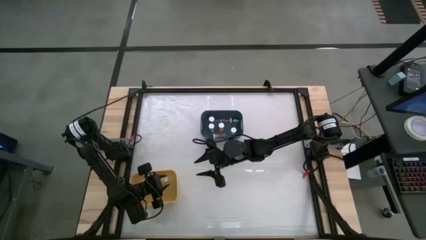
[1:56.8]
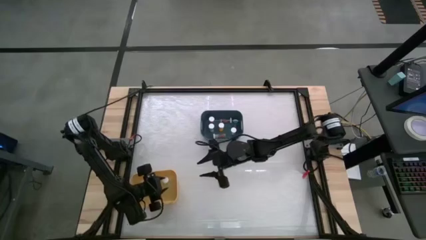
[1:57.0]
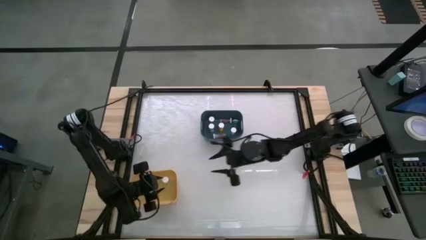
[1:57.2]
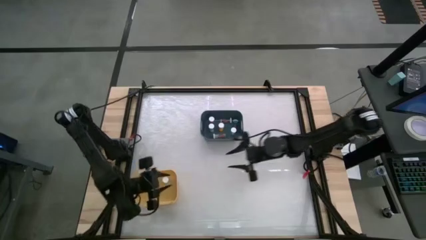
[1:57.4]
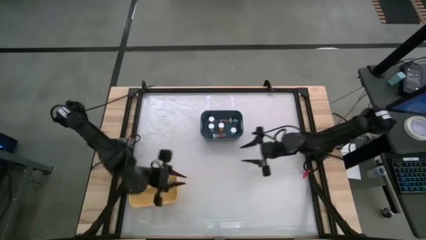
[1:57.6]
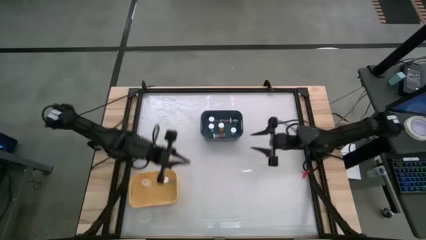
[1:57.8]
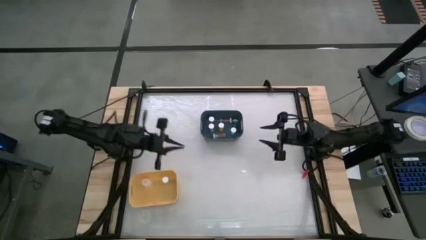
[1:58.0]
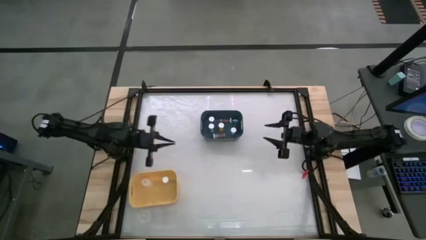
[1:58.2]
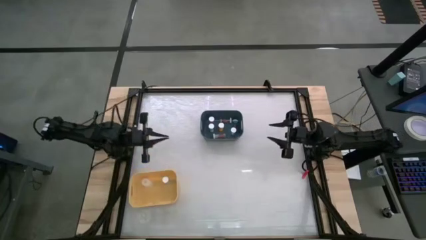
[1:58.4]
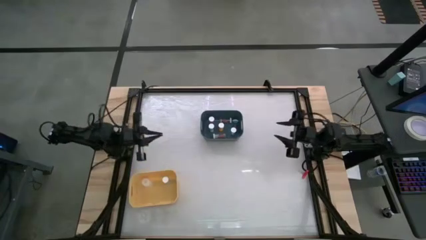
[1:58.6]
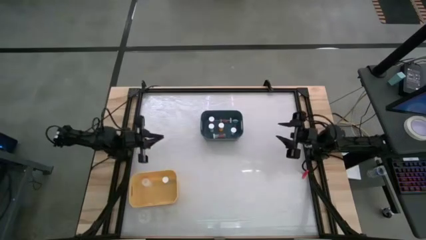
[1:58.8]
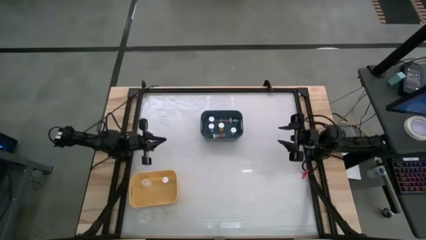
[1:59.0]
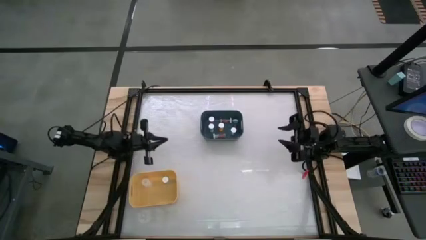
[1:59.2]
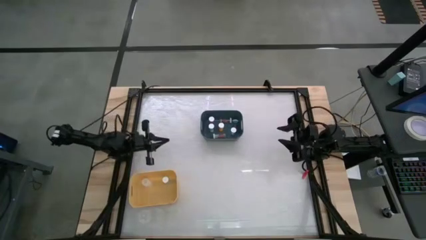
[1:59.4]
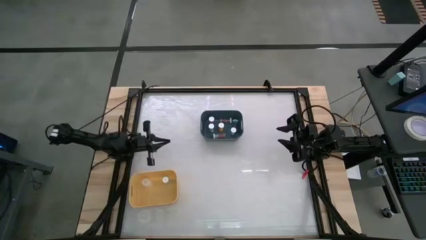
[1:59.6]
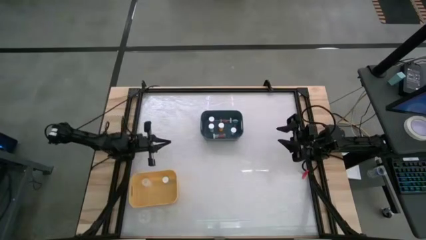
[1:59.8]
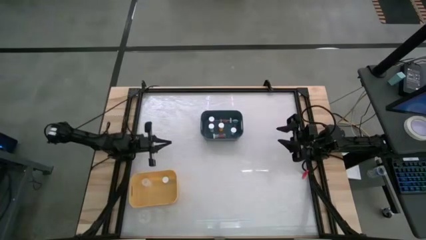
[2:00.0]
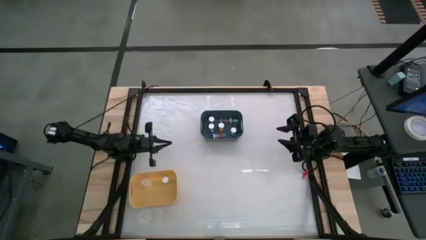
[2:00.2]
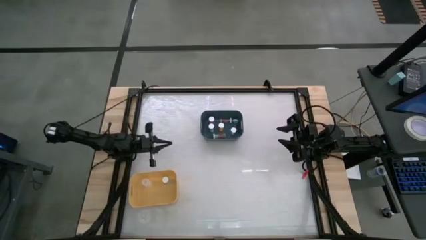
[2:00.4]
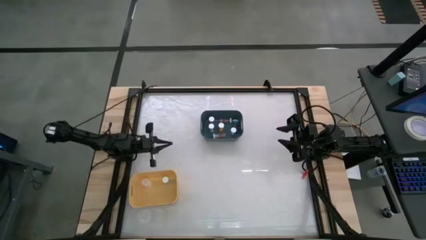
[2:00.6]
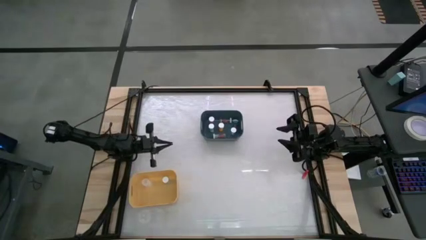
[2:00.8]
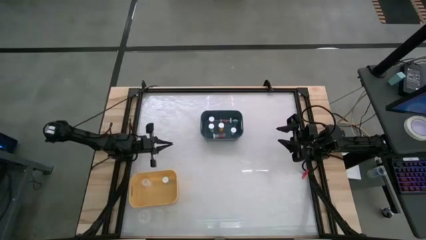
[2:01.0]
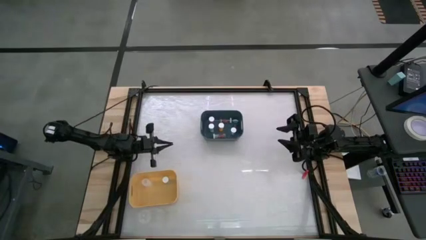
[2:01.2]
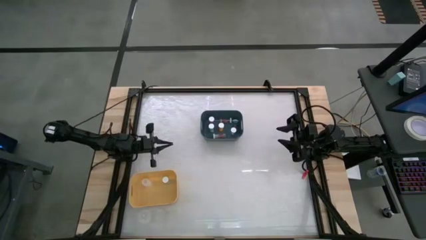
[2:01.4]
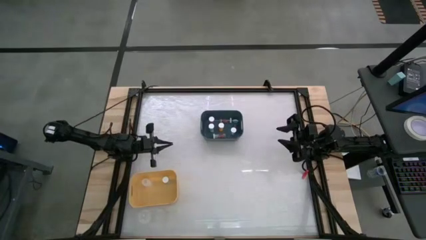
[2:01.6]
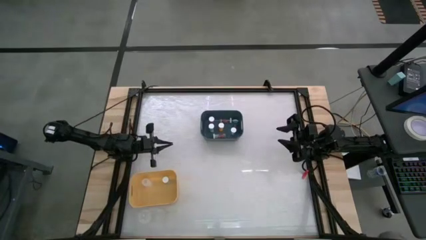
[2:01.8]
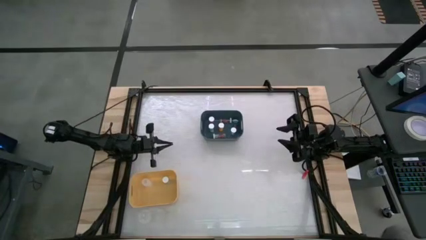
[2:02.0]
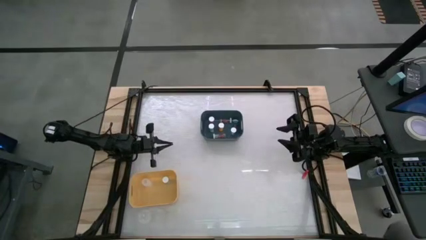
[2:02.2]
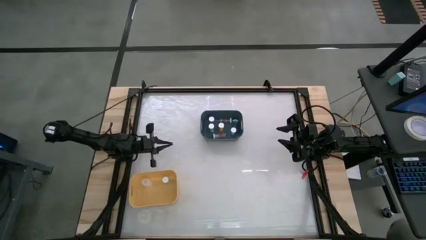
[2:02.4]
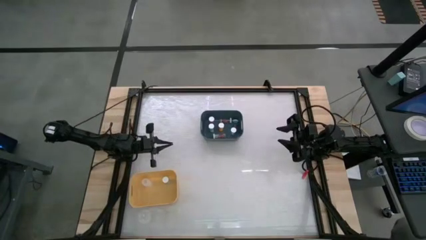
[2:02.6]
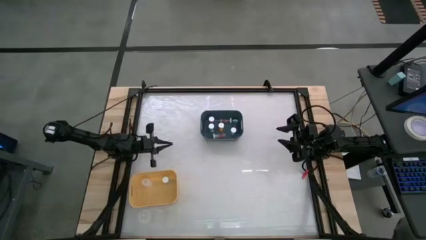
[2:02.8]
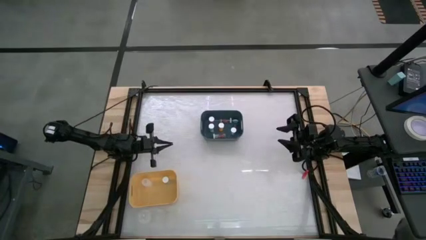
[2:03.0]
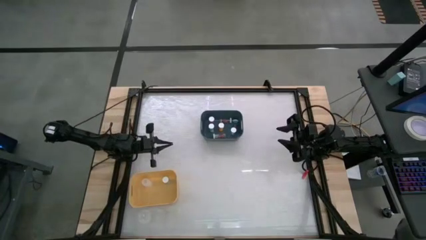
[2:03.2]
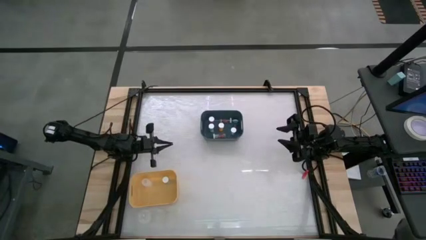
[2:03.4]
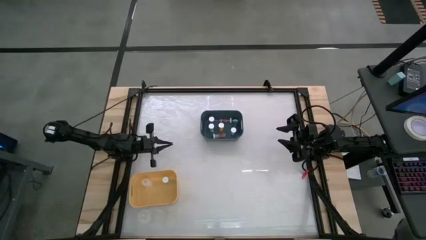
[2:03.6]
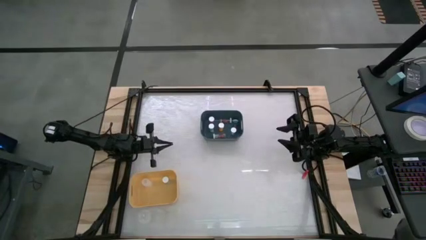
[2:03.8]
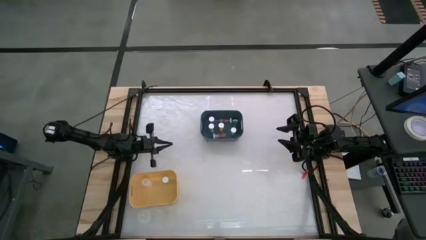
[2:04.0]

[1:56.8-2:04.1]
Task: Pick and place medicine bottles into bin by pill shape (circle, oval)
Return to Home Position

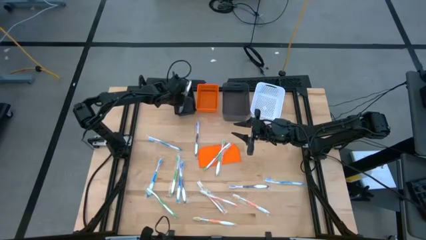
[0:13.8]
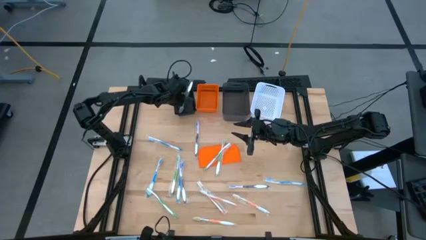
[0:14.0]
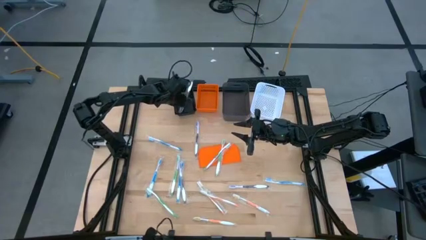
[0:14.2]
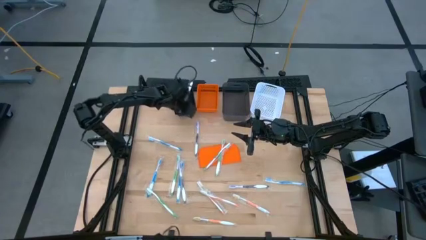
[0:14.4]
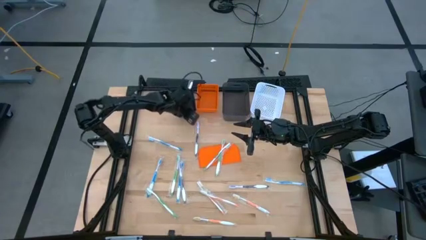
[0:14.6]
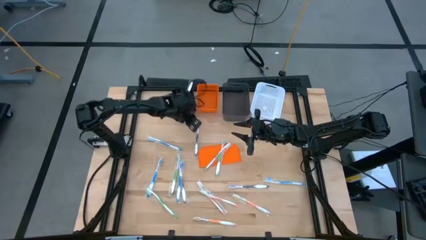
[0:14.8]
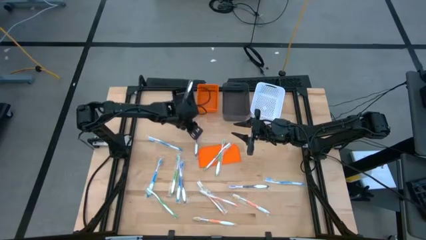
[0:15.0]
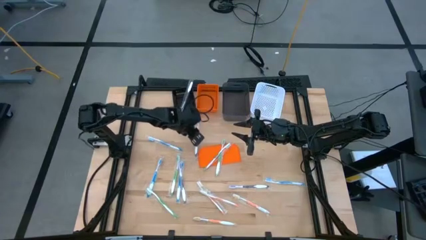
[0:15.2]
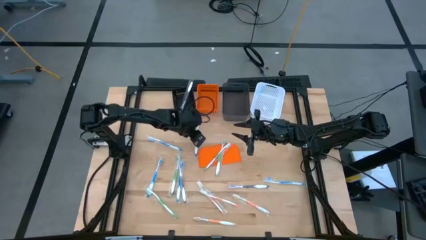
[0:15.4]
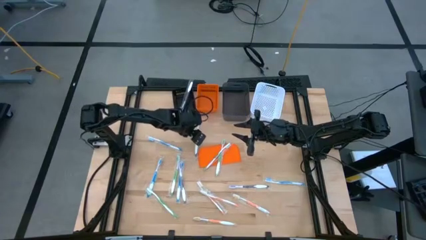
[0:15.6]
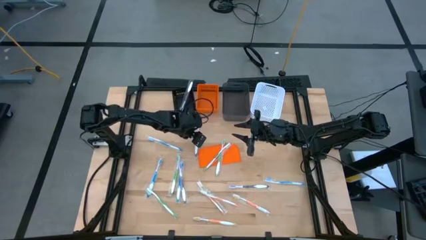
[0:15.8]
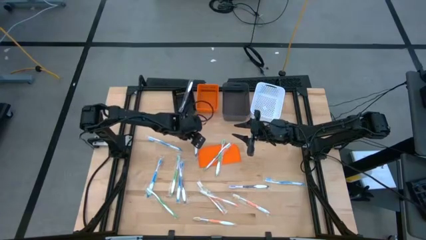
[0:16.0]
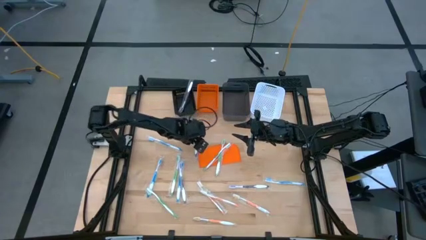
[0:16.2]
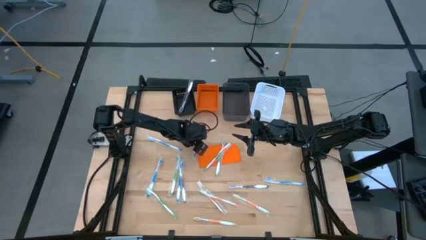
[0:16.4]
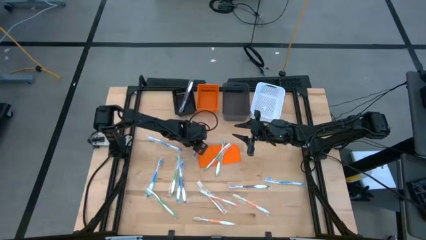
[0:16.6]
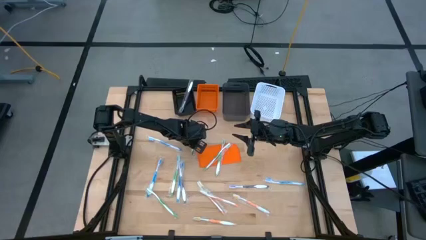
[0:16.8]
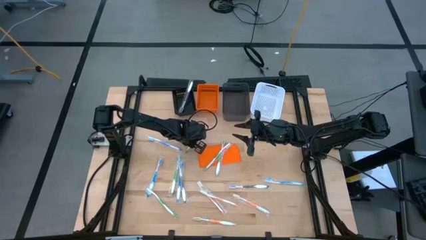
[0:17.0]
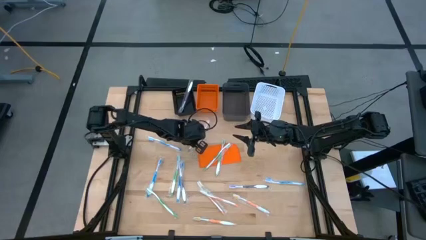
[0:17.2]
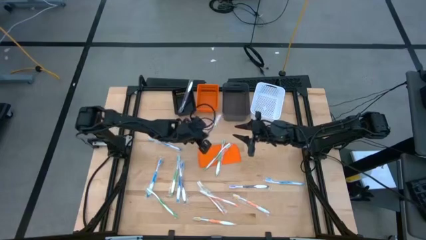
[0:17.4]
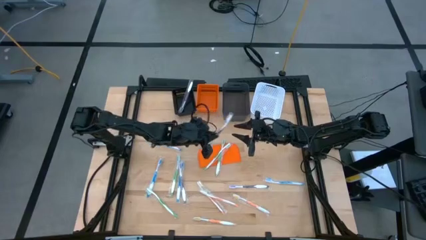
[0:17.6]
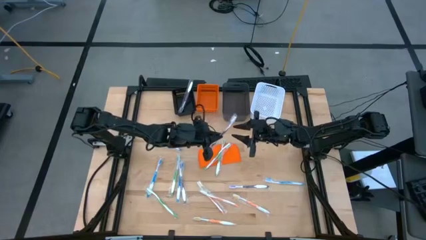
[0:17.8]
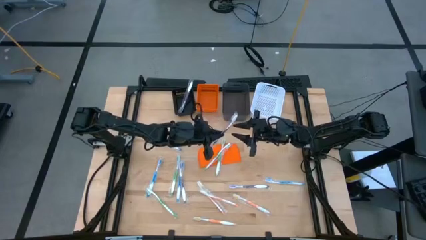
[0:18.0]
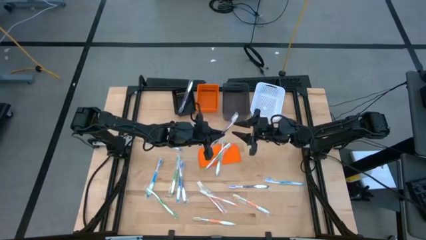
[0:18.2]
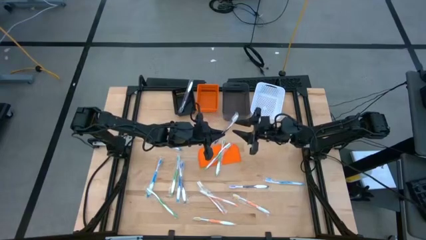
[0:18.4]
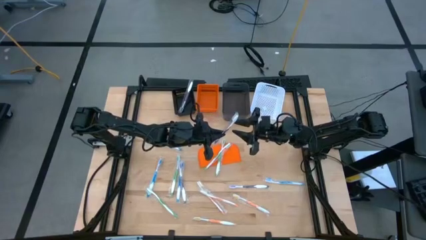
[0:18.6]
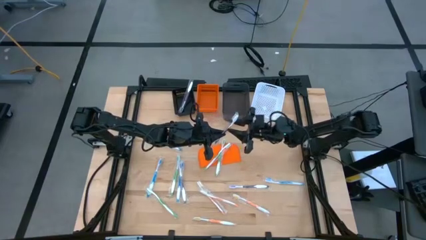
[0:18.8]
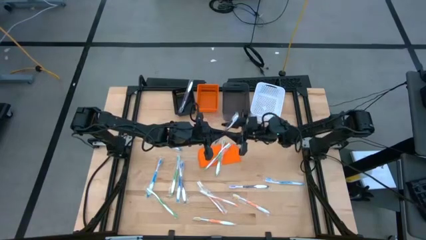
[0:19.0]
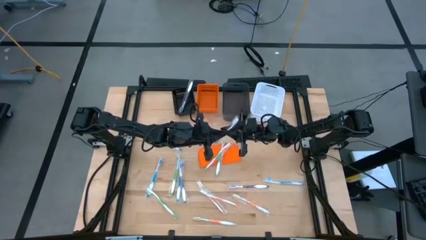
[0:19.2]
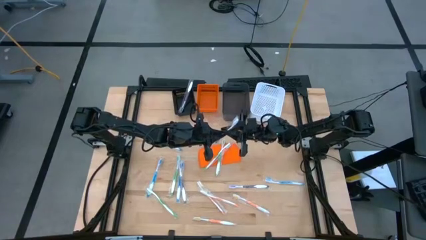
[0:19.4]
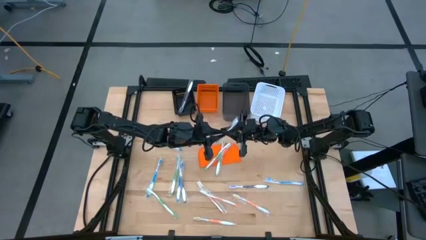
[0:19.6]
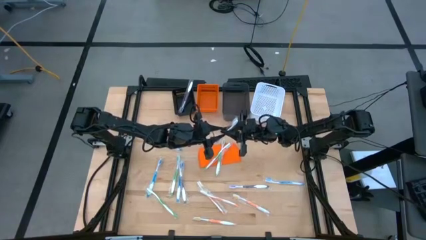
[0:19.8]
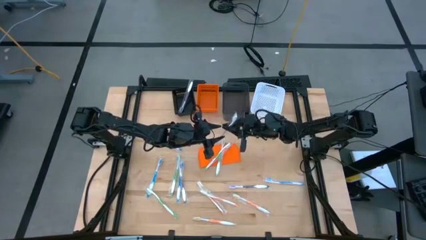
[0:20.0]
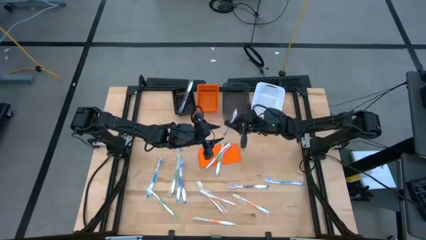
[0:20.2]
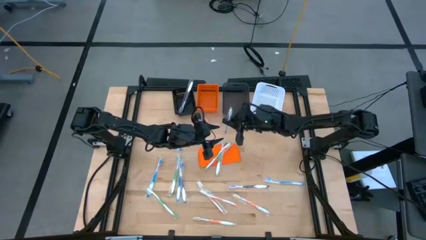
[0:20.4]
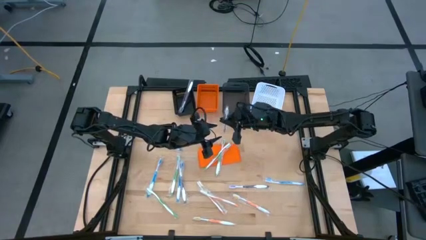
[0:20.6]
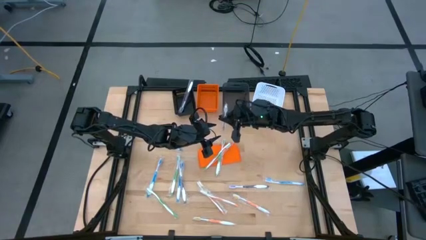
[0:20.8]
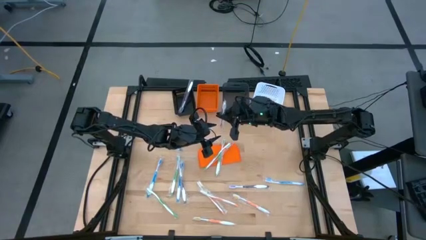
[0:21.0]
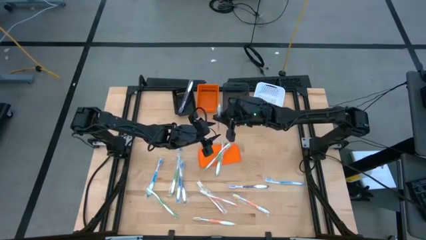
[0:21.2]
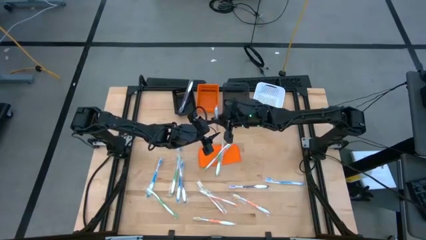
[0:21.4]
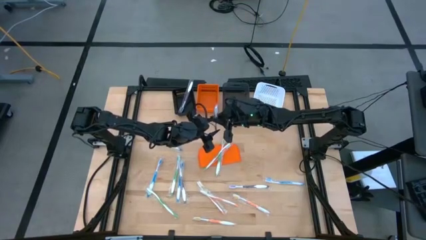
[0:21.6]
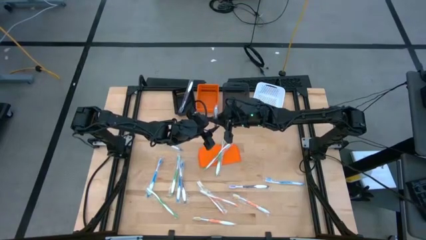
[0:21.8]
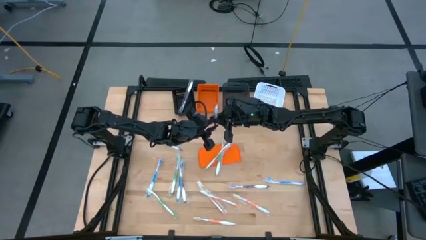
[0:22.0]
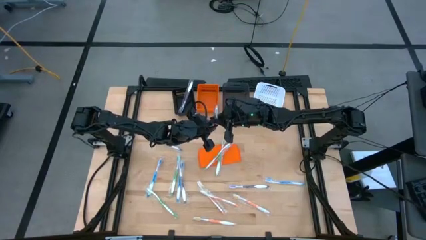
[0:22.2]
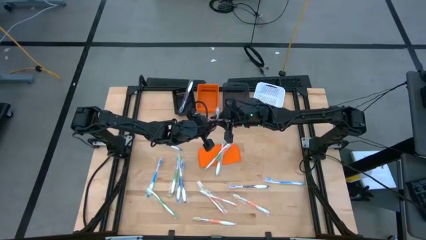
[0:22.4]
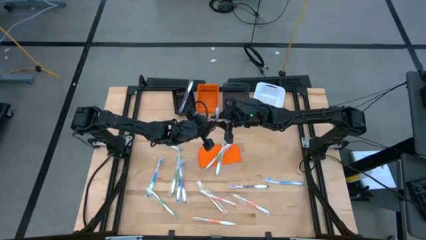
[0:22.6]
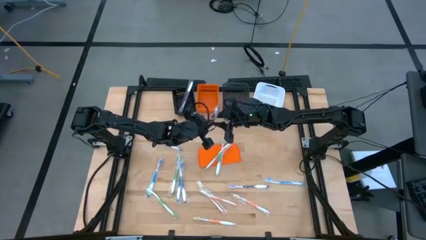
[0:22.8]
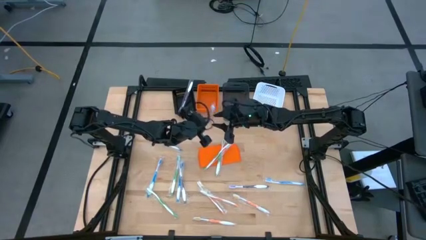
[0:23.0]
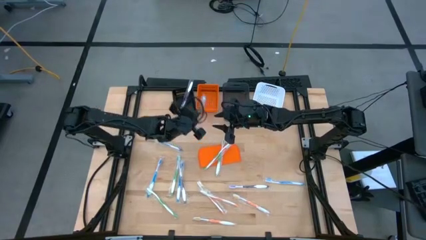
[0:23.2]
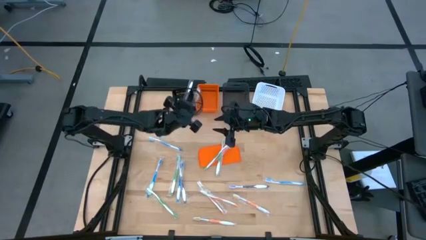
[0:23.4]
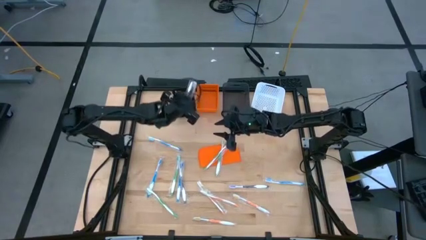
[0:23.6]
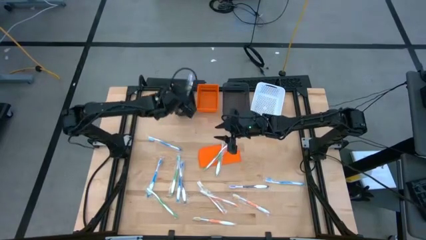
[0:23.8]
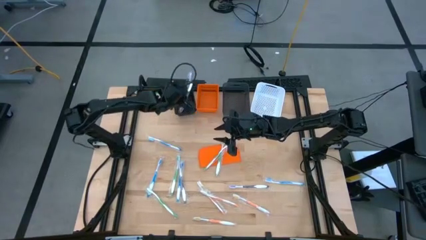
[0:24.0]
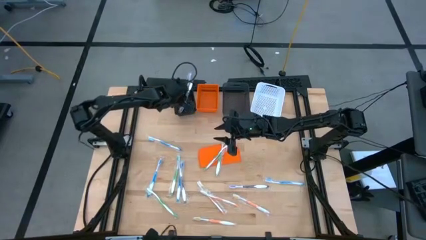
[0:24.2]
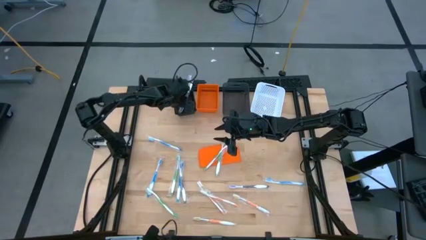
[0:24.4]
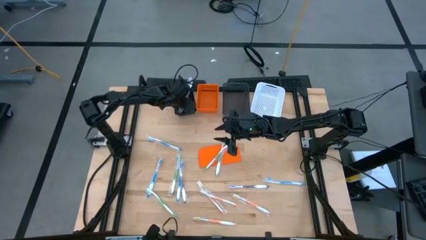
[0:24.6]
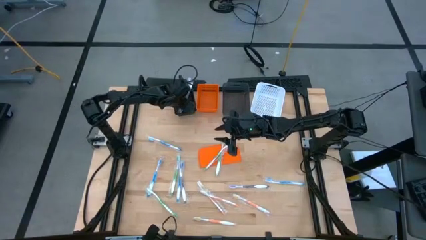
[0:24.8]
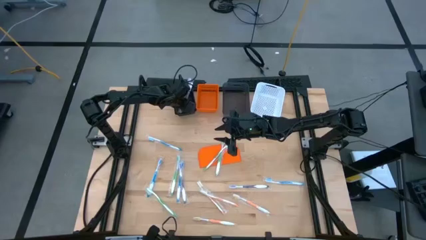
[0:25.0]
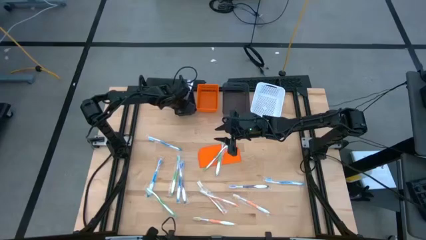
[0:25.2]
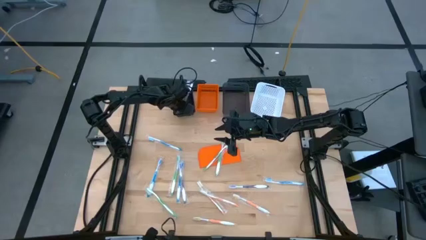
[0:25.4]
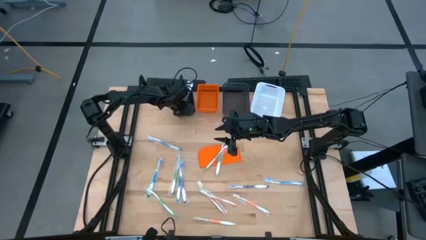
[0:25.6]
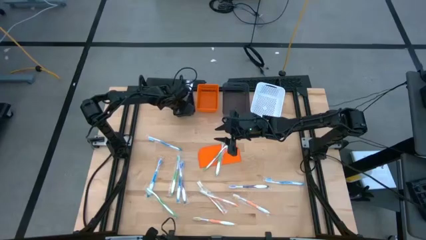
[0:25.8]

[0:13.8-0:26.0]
Task: Pick & Place Toothbrushes
Put the violet toothbrush into the black bin
